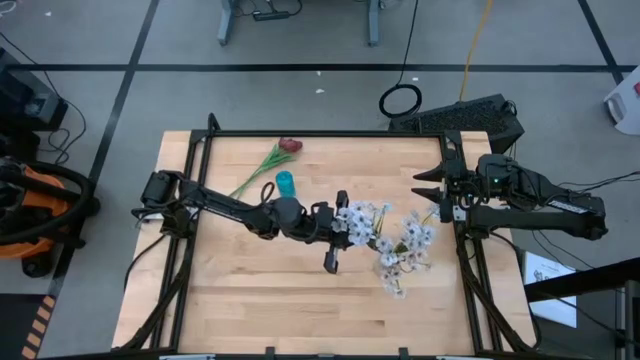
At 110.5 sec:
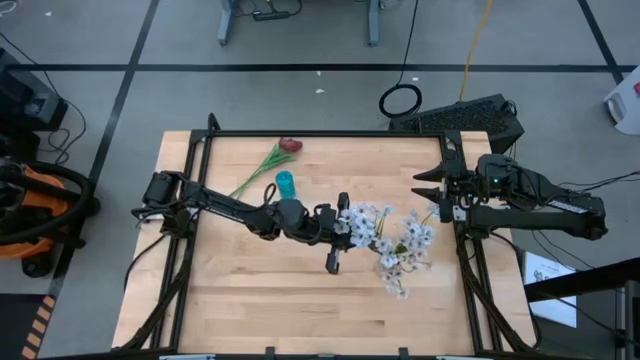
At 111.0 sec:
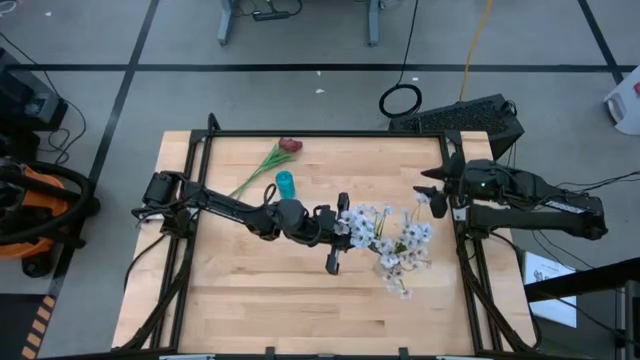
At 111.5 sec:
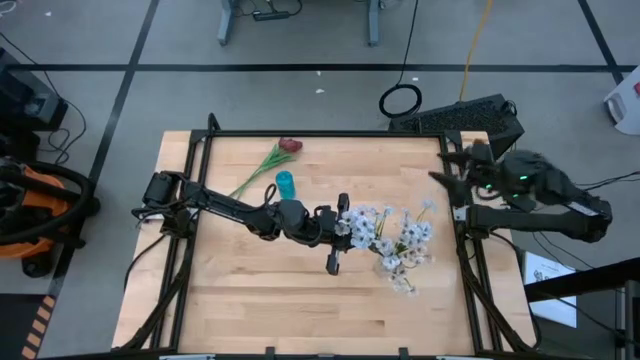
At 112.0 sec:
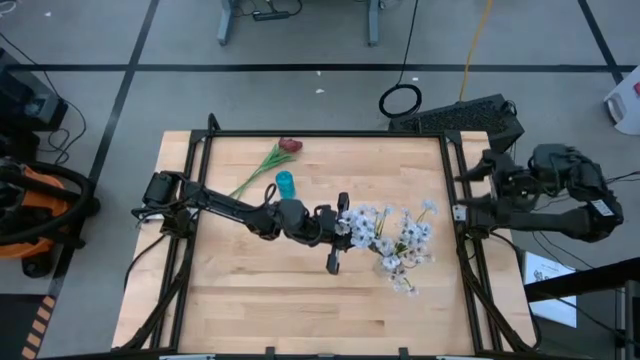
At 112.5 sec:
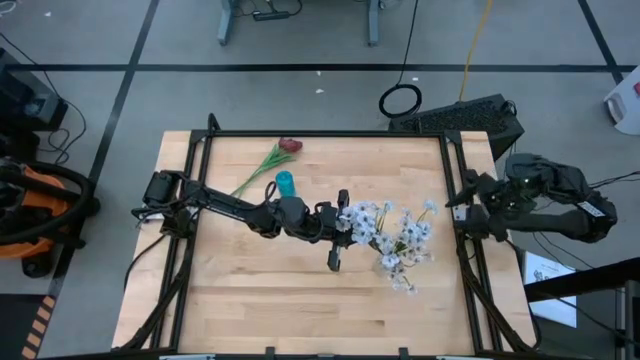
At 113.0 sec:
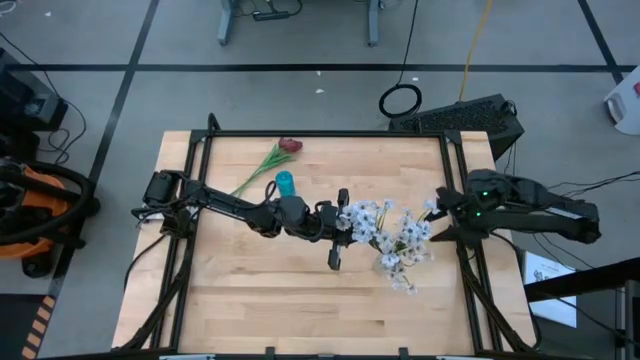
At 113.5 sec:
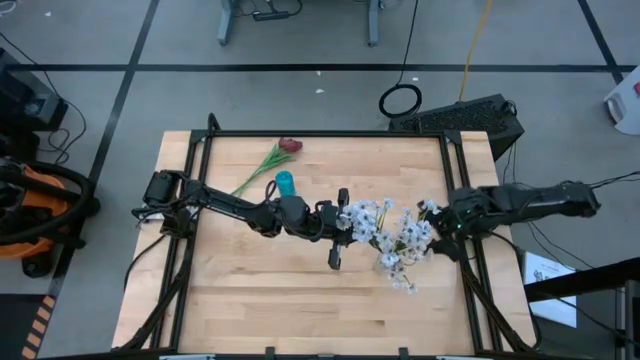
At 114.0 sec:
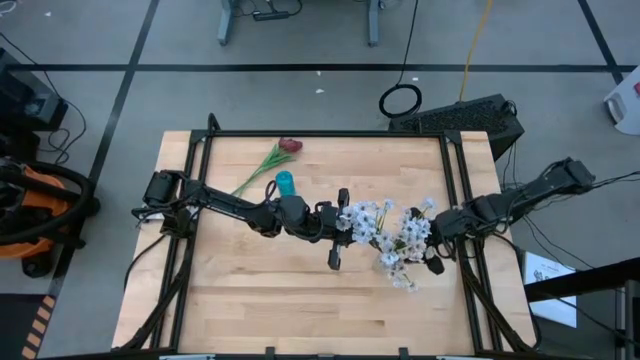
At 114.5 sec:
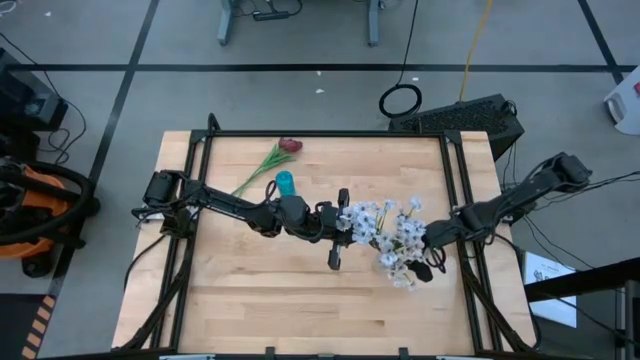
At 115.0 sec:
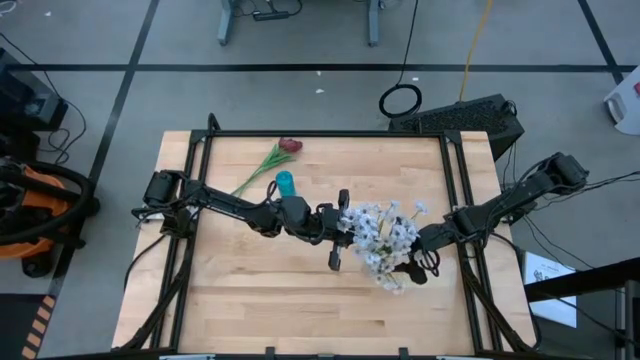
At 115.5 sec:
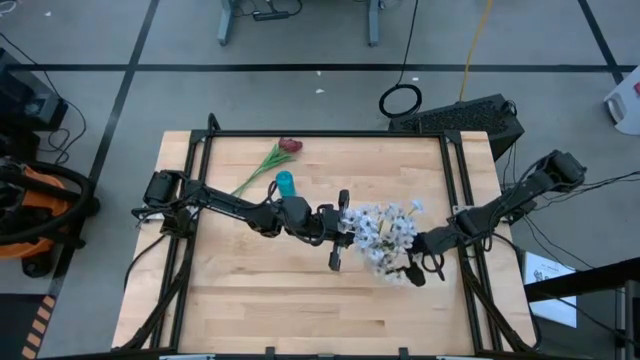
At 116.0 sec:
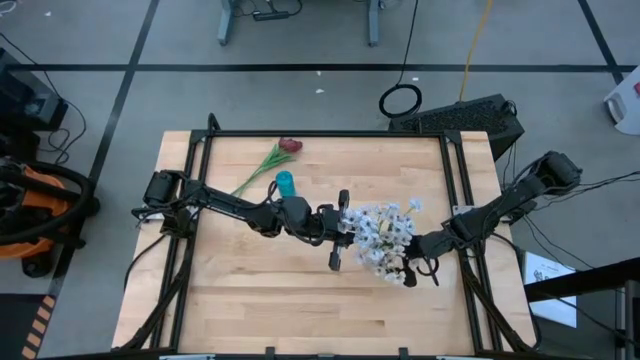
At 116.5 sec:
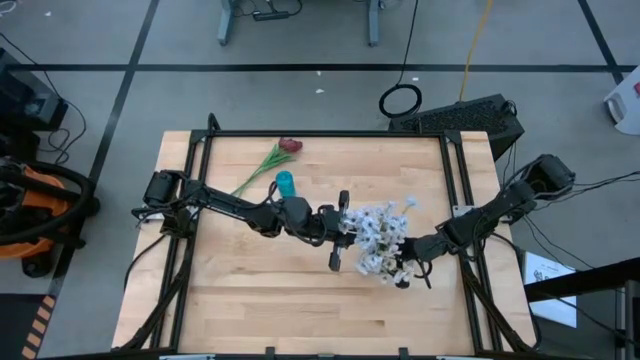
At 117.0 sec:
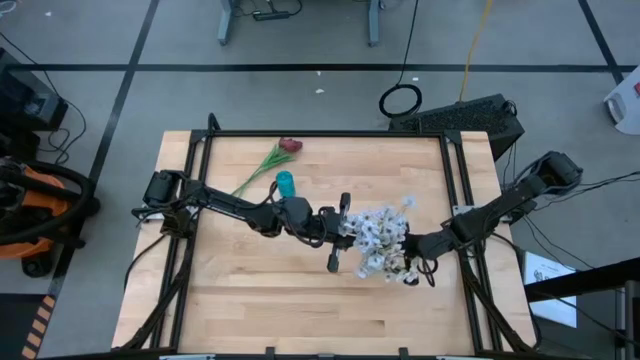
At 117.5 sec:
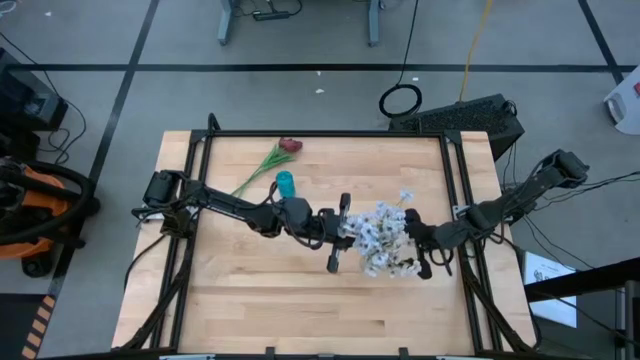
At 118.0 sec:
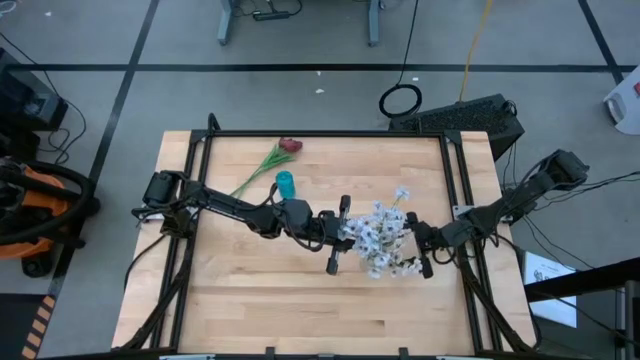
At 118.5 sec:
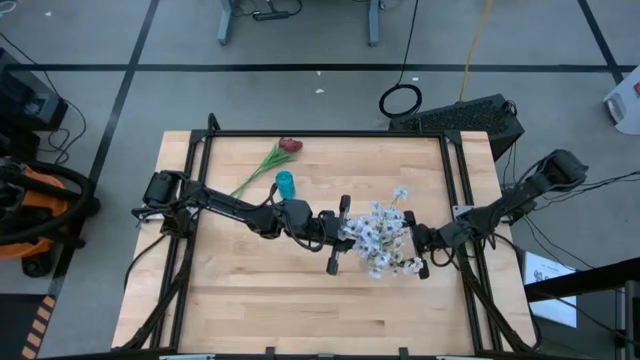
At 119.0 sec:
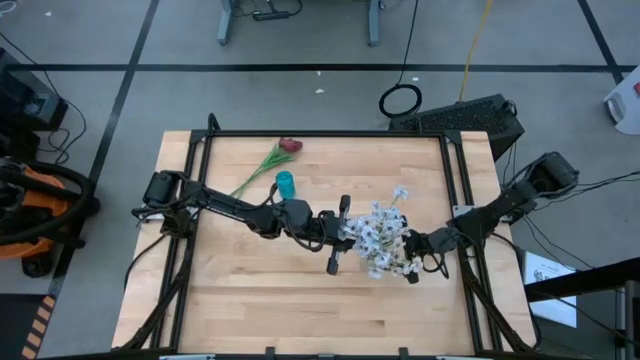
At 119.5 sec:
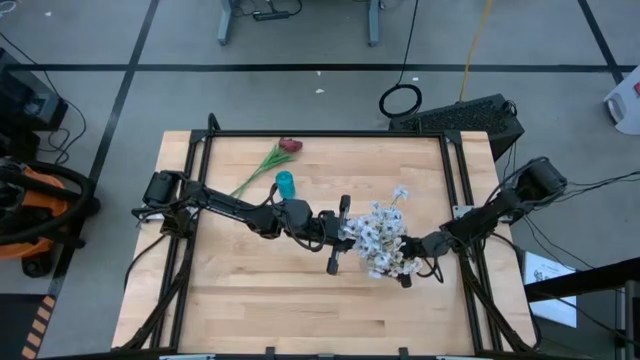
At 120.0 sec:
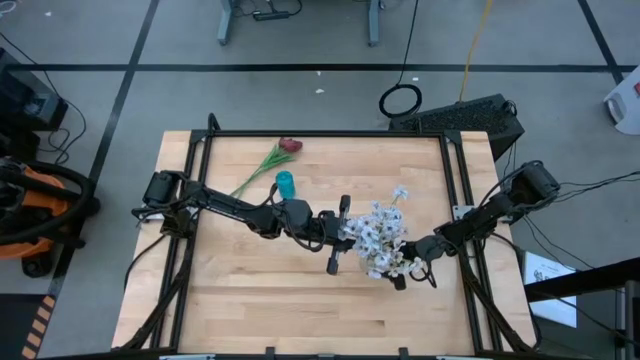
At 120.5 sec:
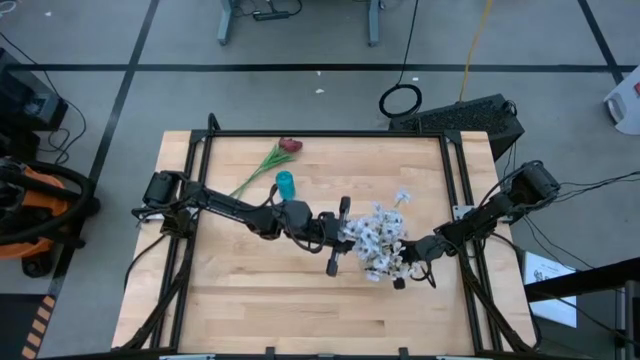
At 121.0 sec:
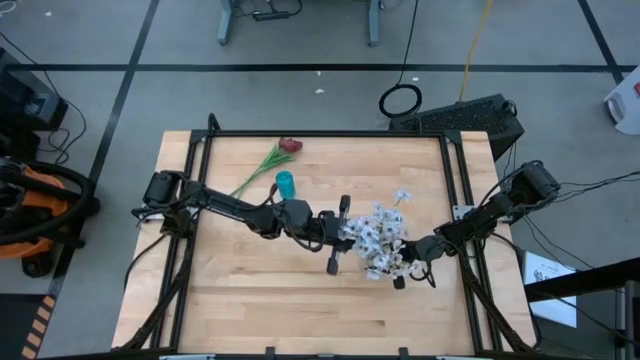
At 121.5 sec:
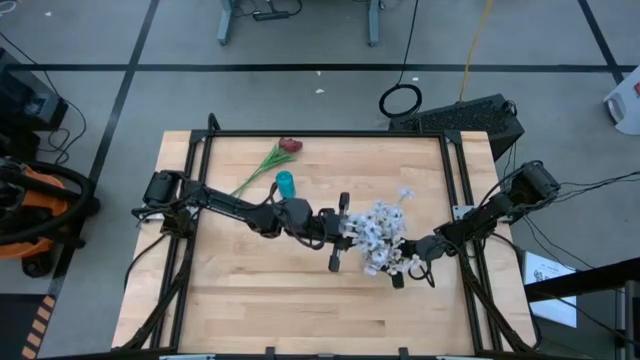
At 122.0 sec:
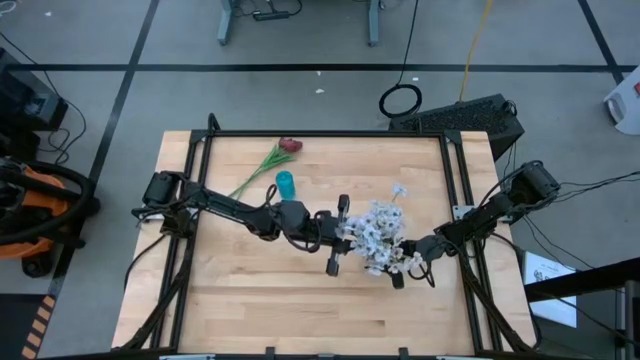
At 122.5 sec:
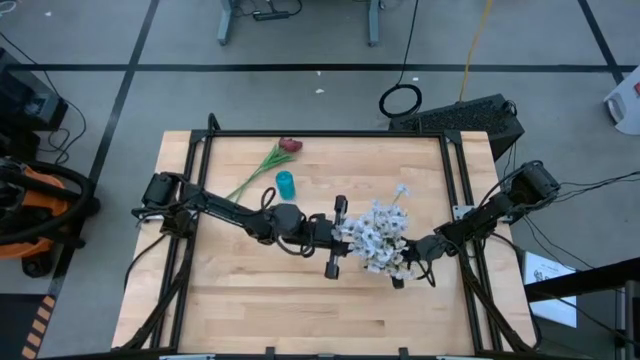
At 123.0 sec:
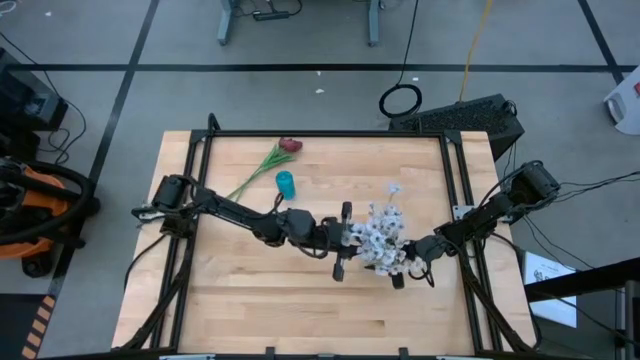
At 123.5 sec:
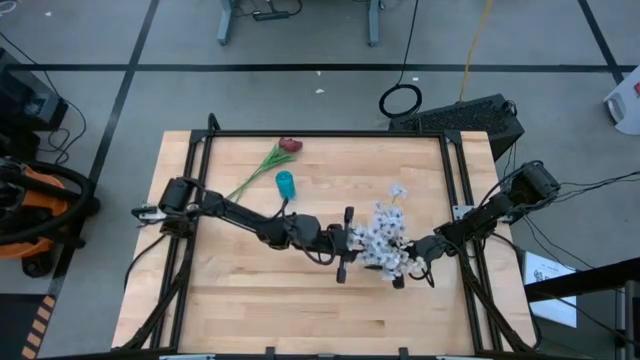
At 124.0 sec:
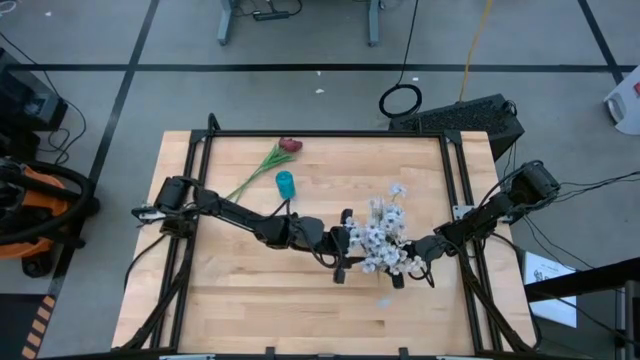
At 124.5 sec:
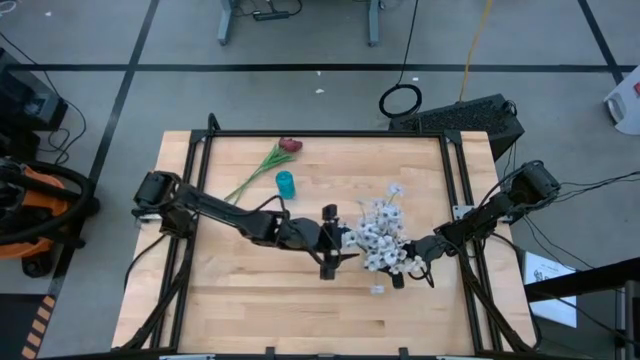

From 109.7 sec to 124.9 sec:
Task: Sort flowers into vase by color
Put the white flowers into the transparent vase

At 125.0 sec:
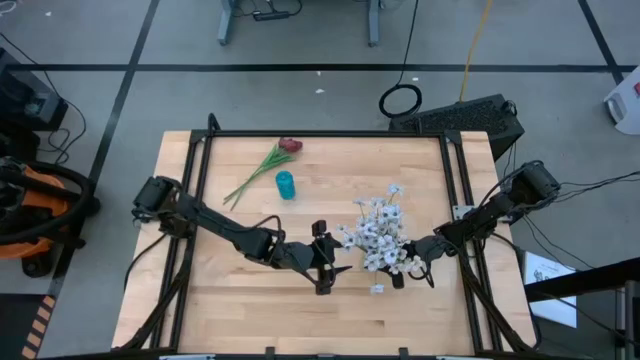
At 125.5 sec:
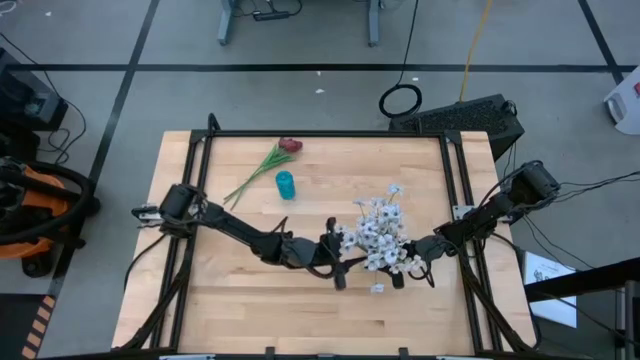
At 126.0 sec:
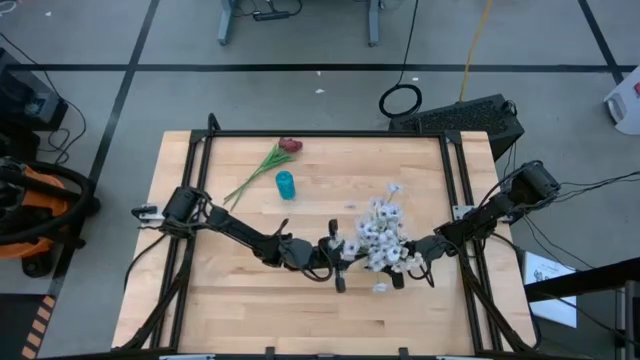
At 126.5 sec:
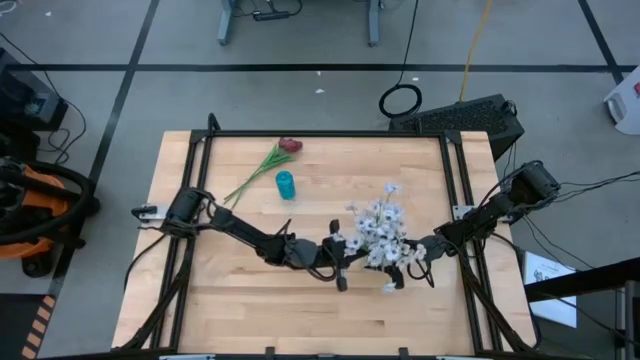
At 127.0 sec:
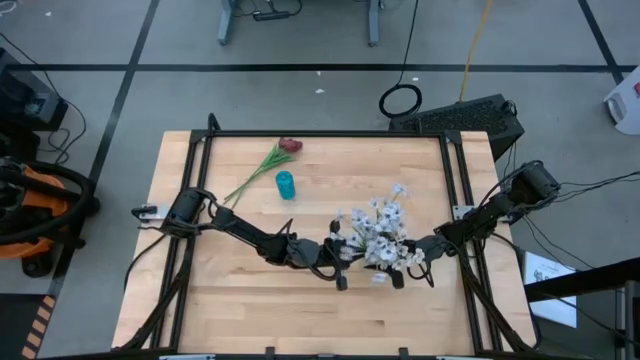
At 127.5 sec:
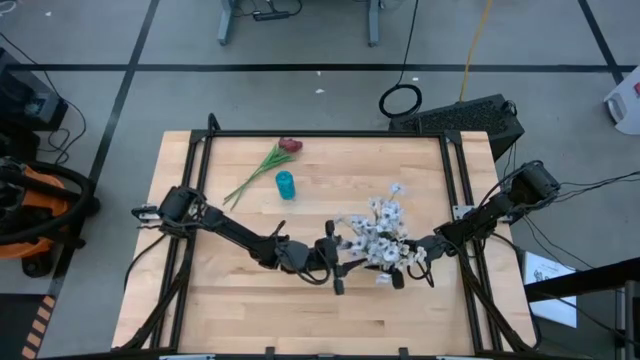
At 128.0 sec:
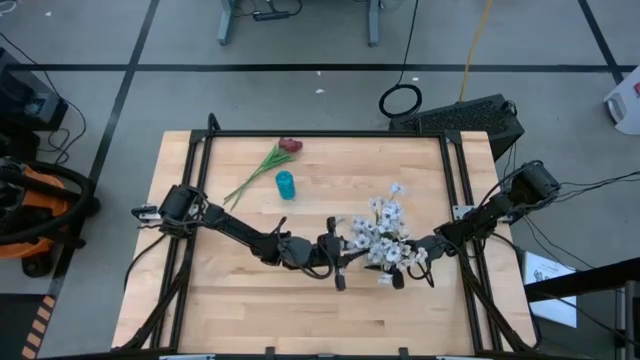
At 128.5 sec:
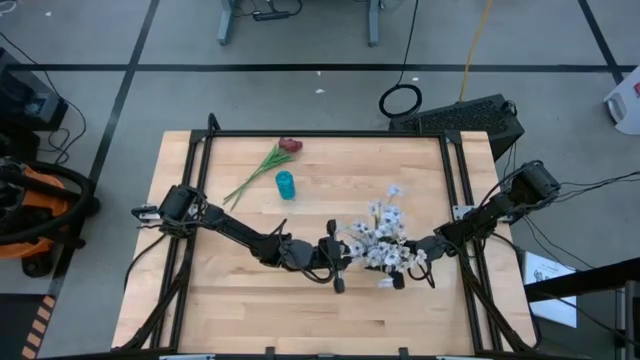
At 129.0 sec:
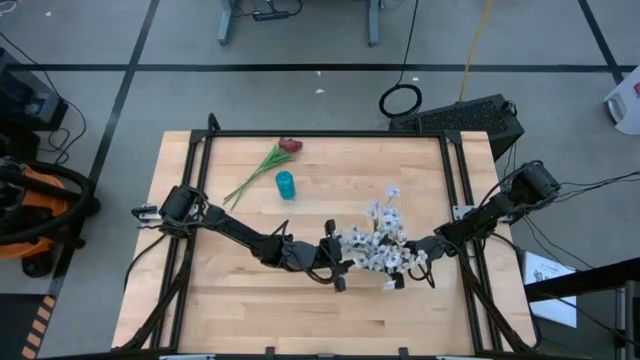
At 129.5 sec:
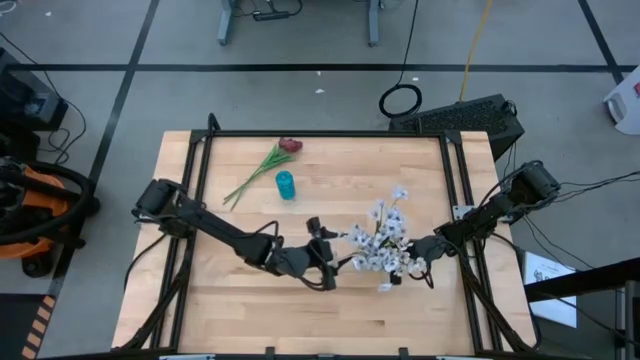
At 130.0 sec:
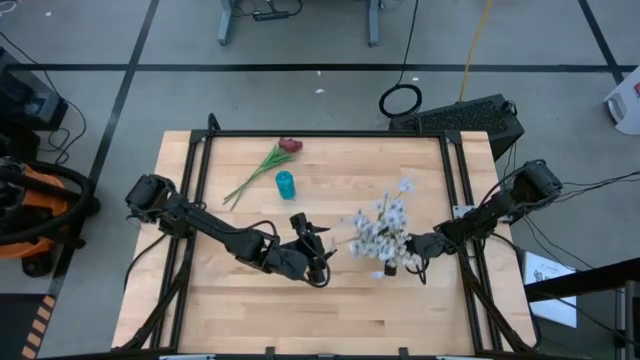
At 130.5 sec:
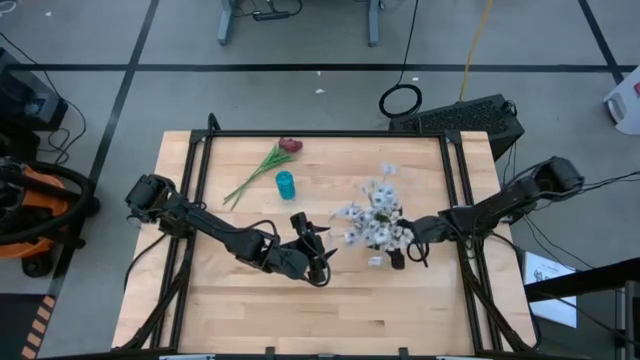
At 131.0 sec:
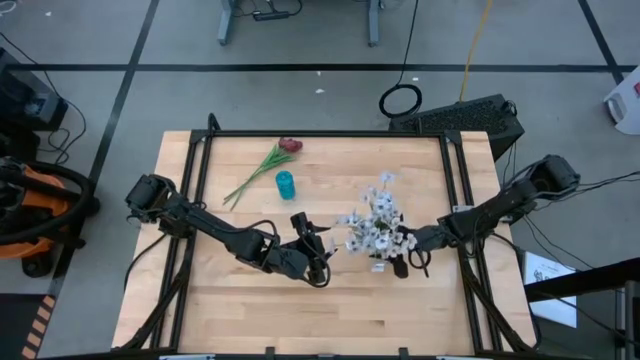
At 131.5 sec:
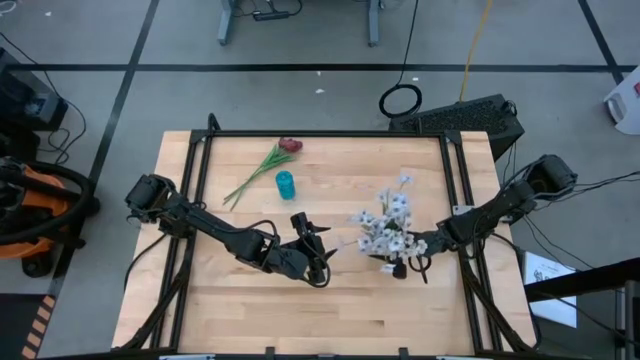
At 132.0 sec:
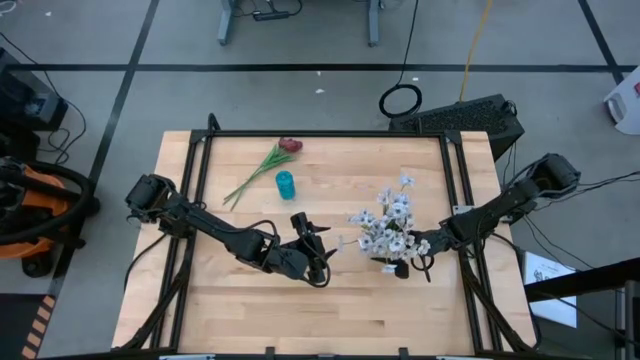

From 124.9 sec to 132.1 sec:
Adjust the white flowers into the transparent vase
